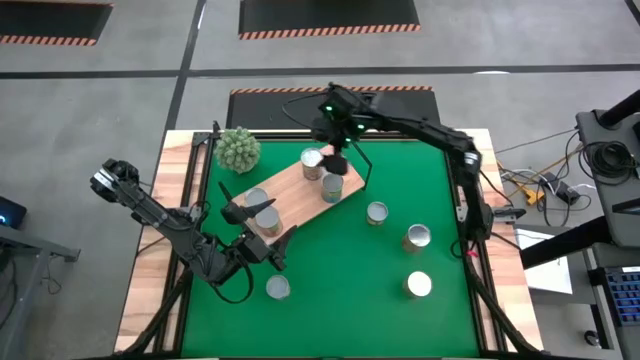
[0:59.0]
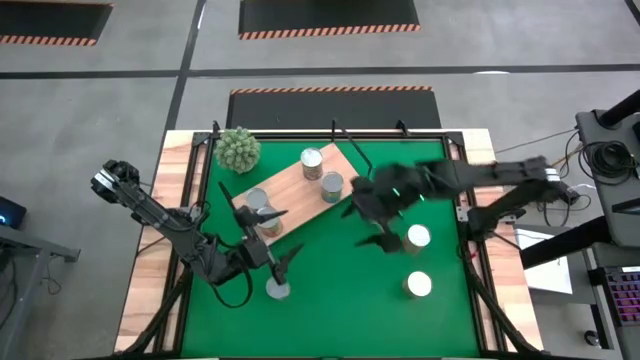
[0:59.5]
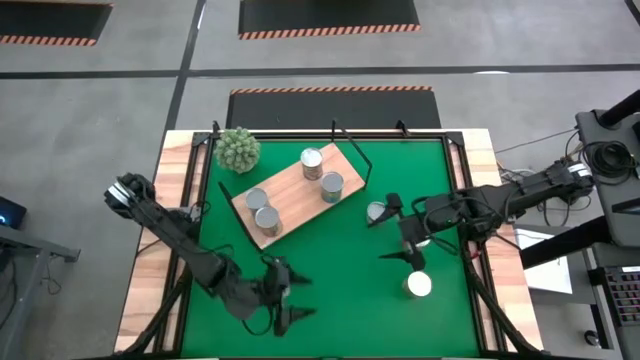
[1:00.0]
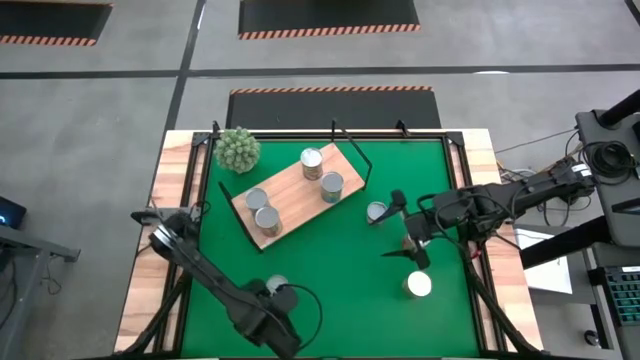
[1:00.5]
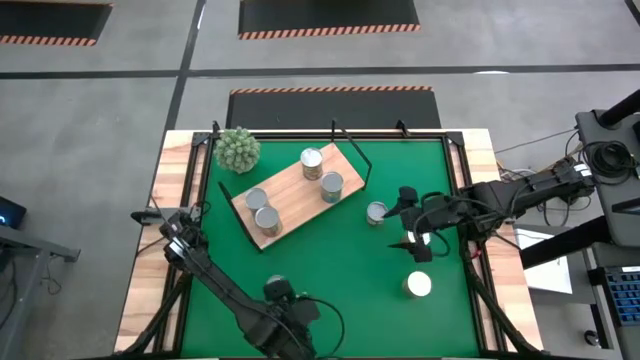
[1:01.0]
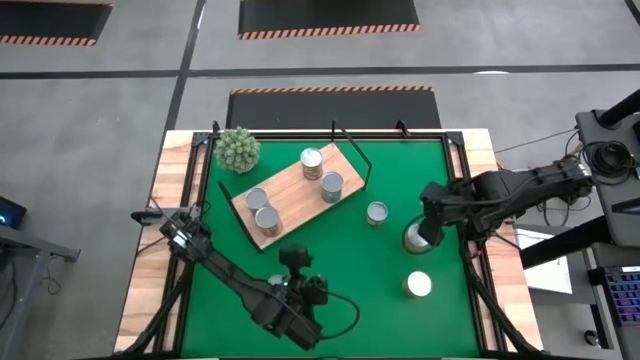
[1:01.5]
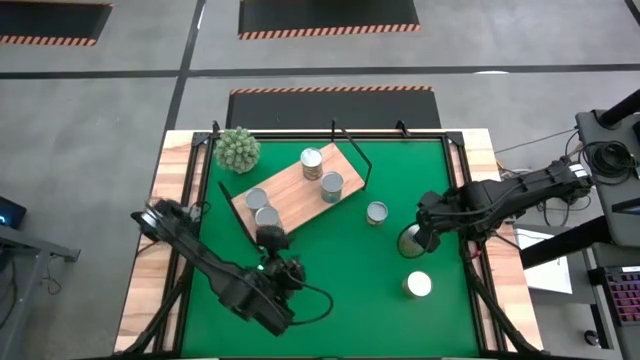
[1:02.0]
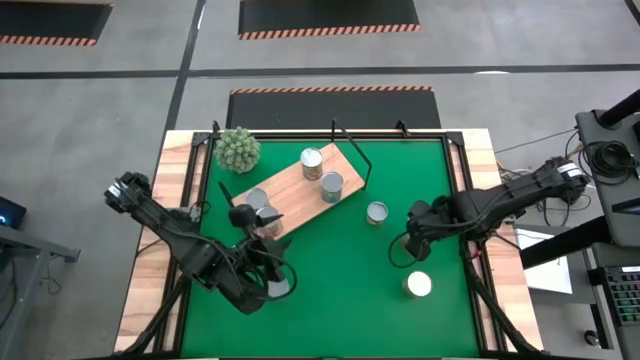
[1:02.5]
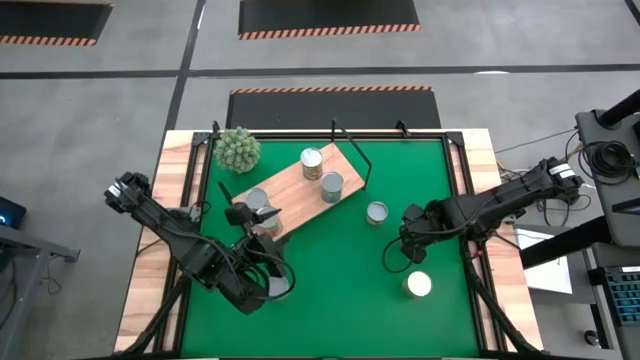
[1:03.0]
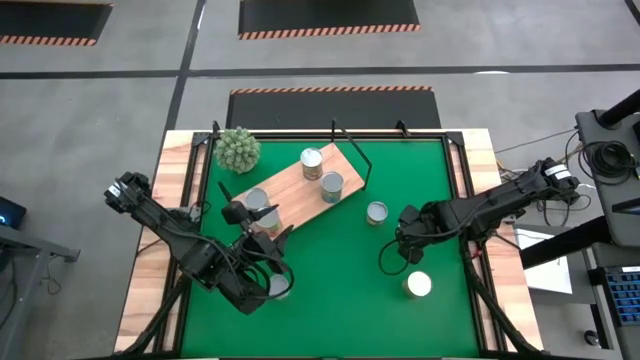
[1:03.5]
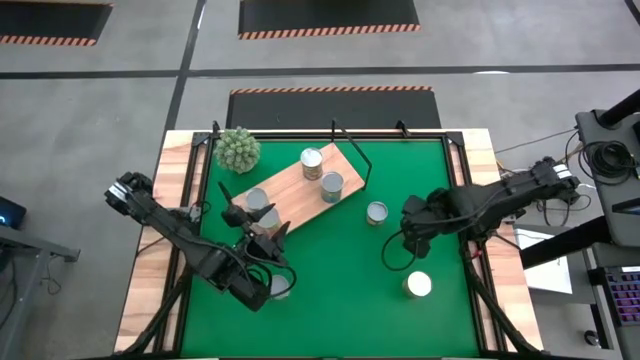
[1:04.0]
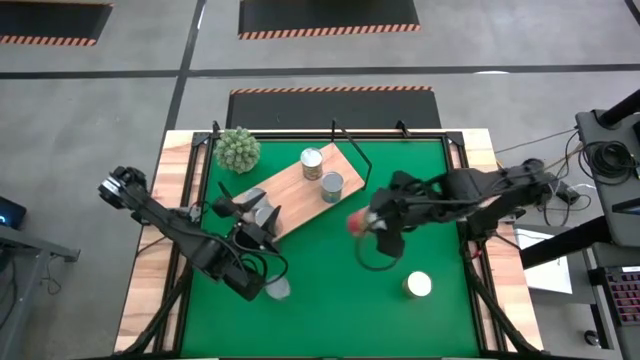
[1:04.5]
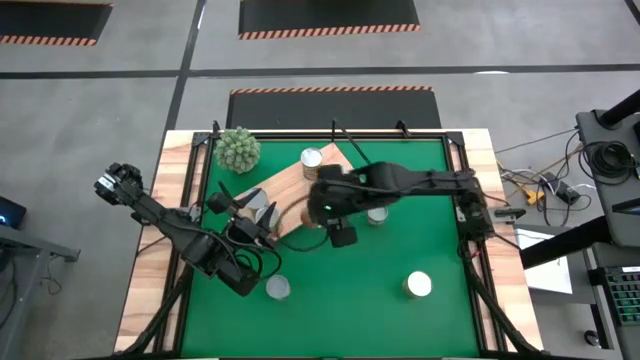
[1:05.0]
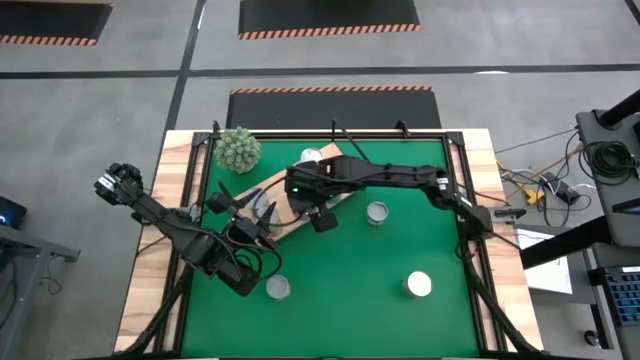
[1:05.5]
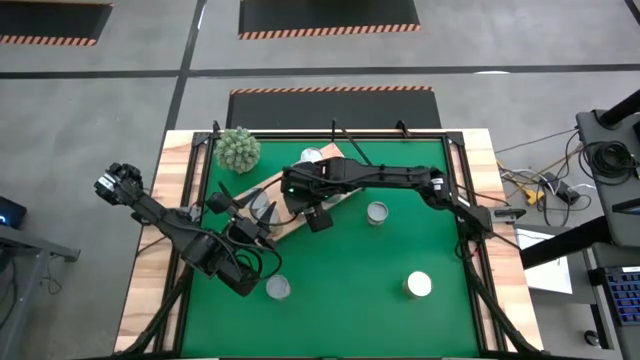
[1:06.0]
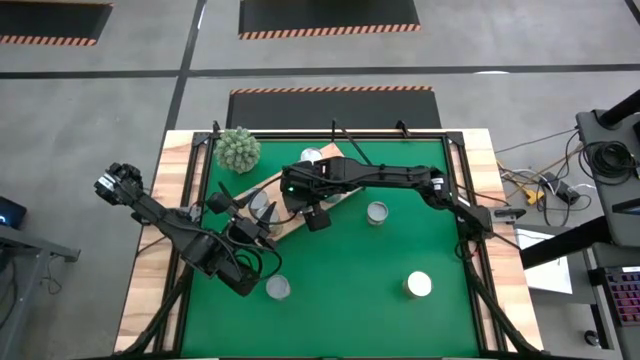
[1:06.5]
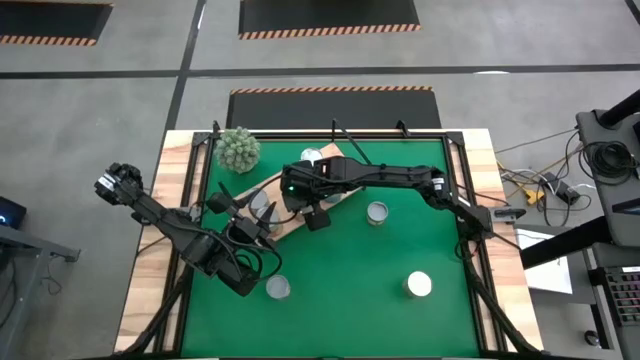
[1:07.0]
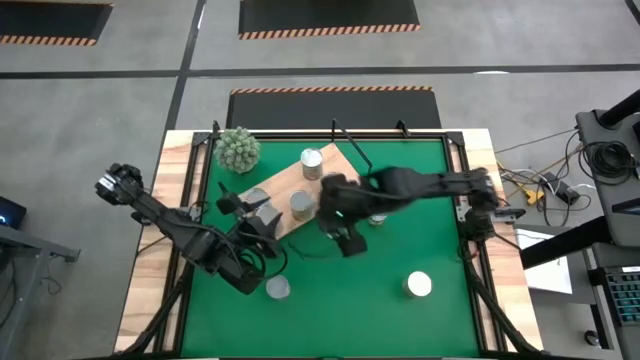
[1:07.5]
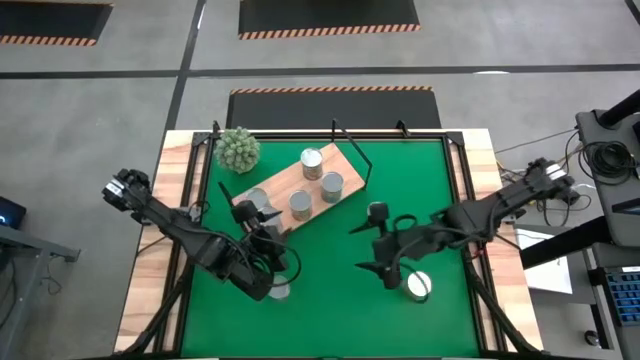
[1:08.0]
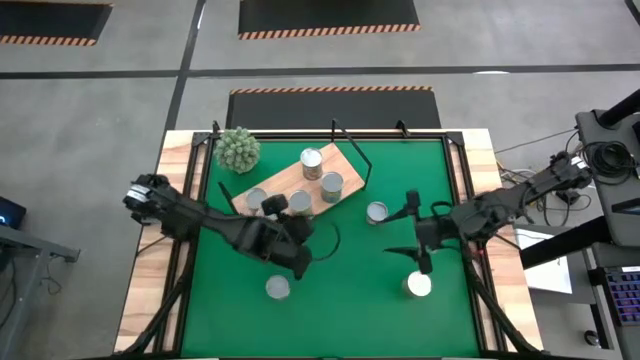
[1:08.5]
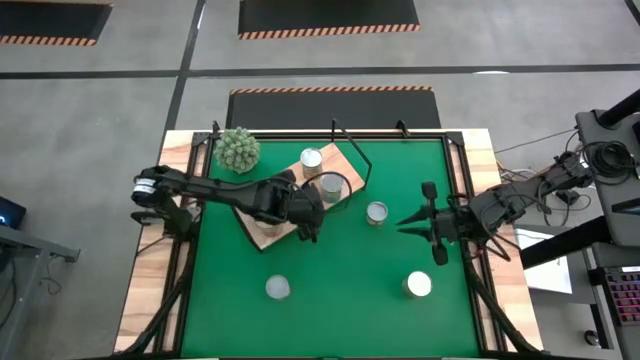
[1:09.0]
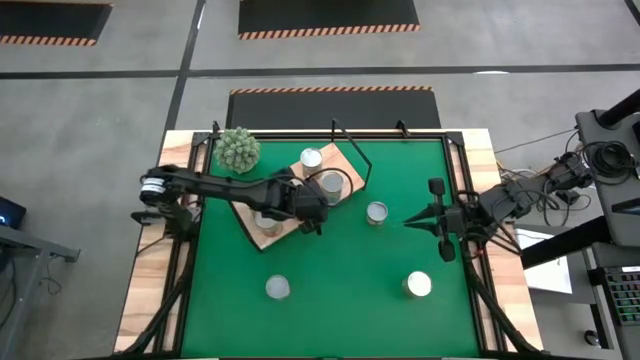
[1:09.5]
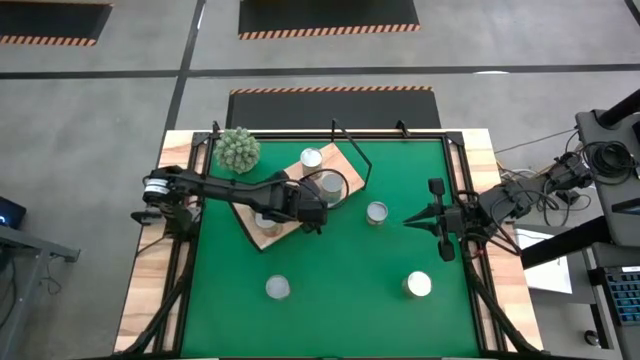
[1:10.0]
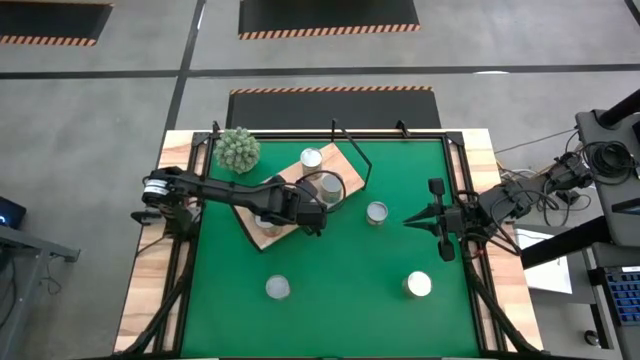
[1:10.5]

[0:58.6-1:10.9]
Task: Pick and place cans onto a shelf
Put the canned pineapple on the shelf

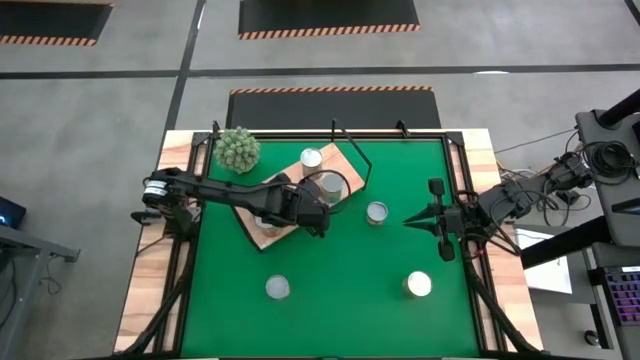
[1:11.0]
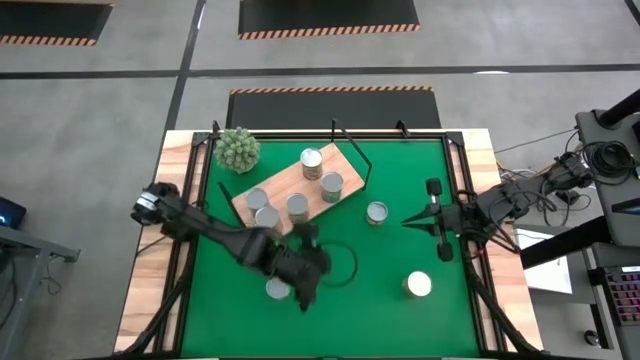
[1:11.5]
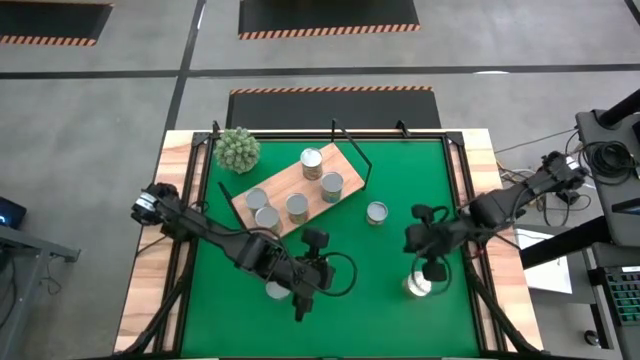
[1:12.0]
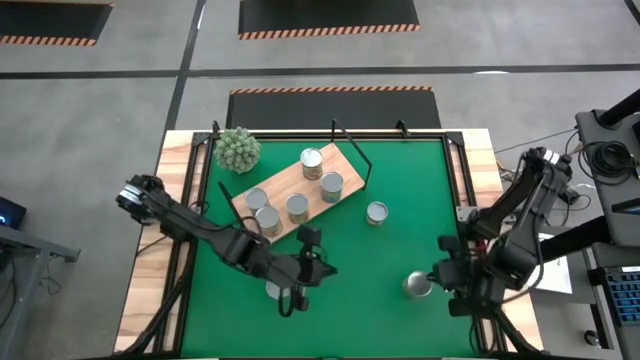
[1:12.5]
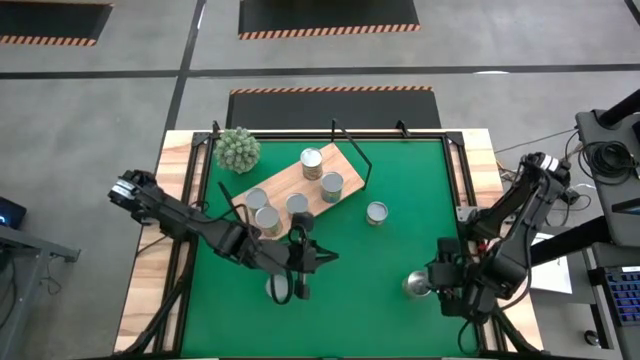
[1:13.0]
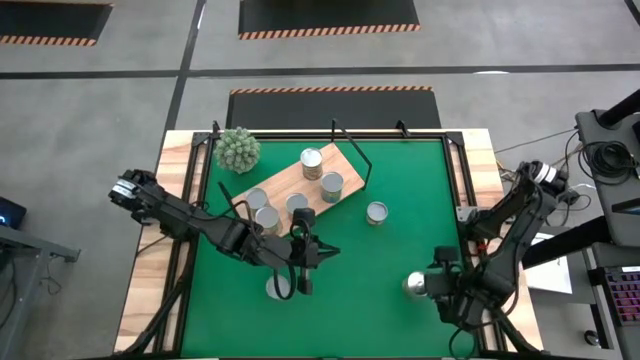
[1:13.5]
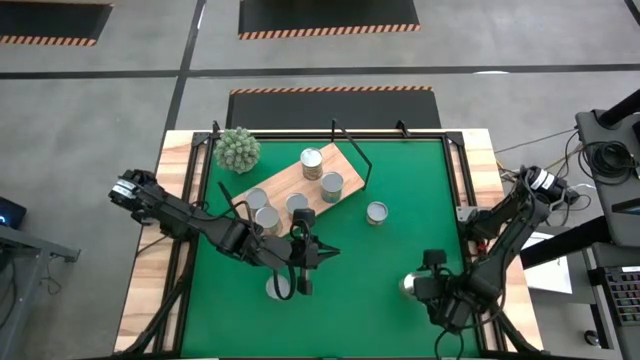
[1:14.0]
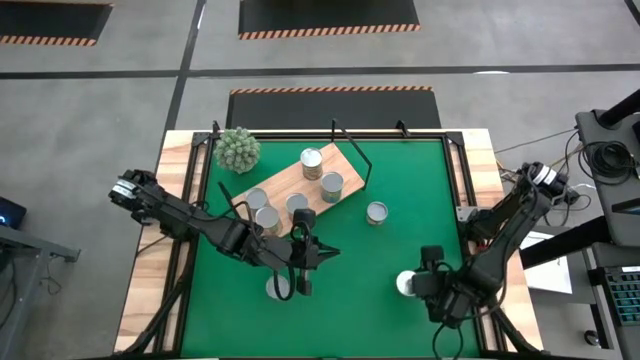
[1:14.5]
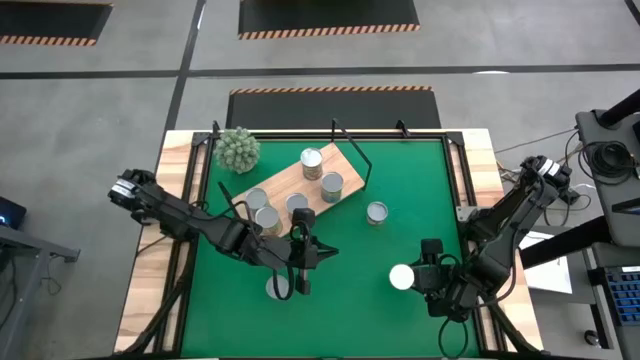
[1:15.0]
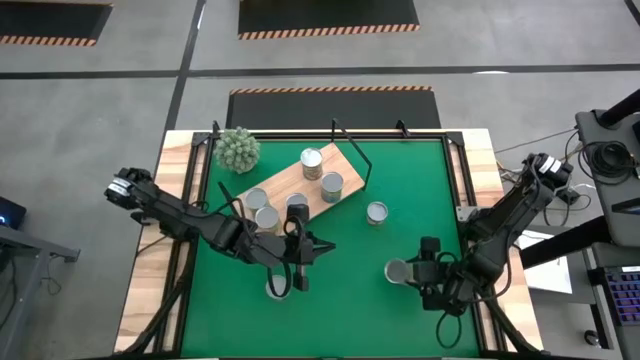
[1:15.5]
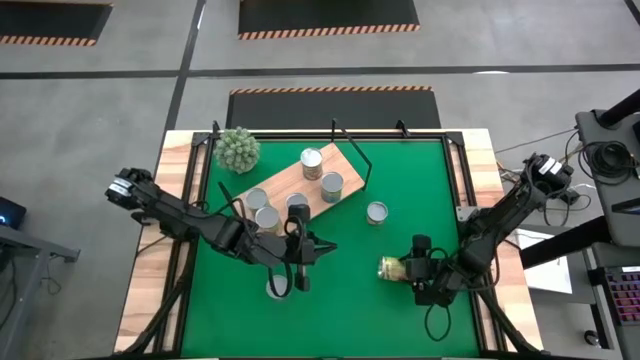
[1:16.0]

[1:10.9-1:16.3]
Put the canned peaches on the shelf

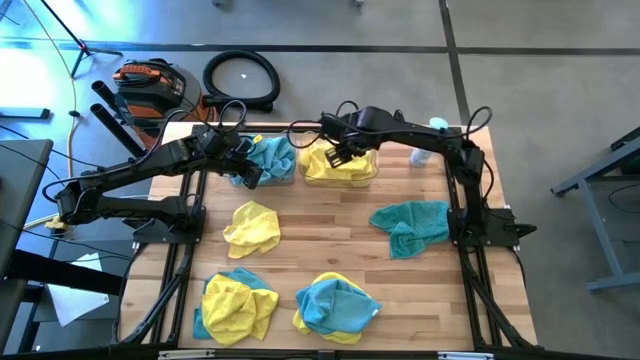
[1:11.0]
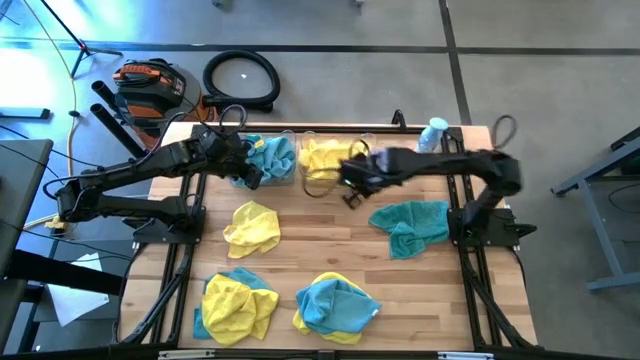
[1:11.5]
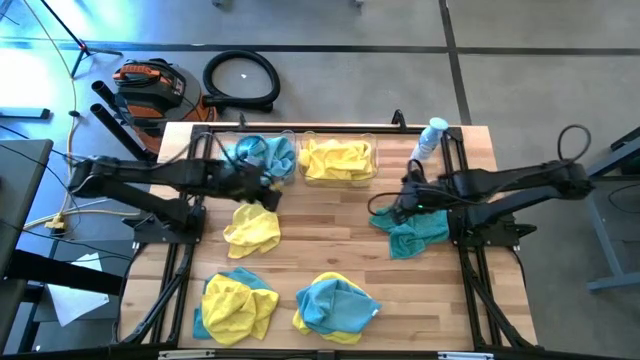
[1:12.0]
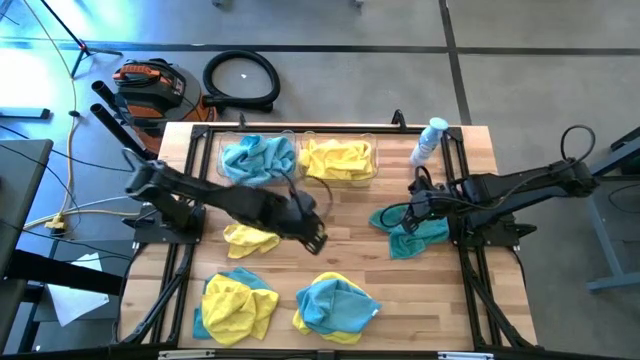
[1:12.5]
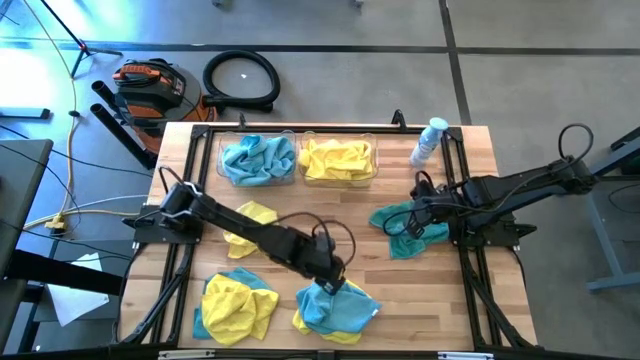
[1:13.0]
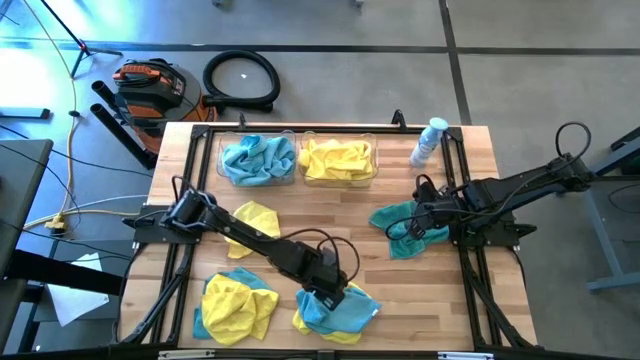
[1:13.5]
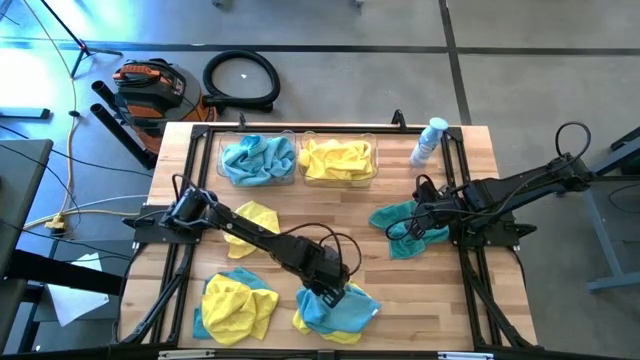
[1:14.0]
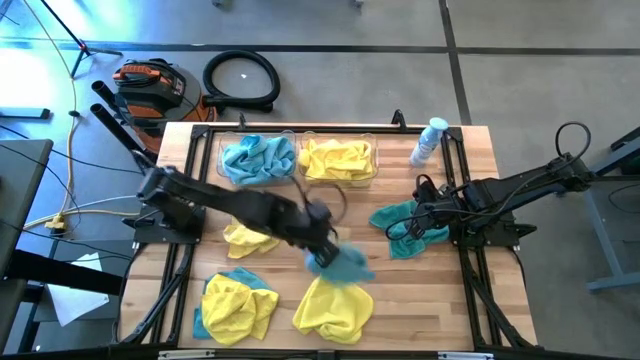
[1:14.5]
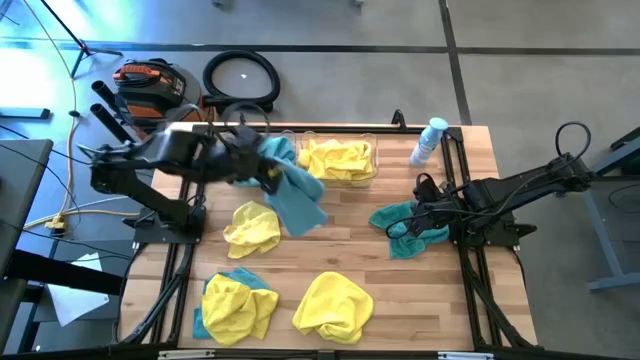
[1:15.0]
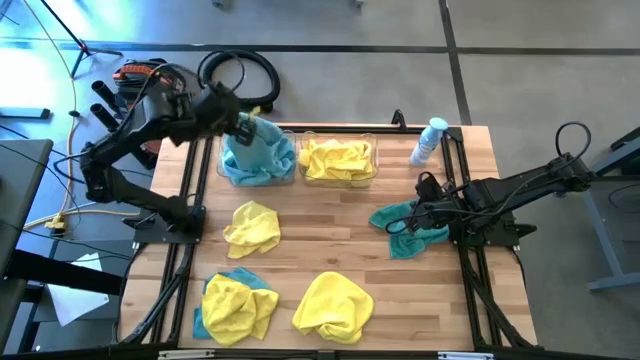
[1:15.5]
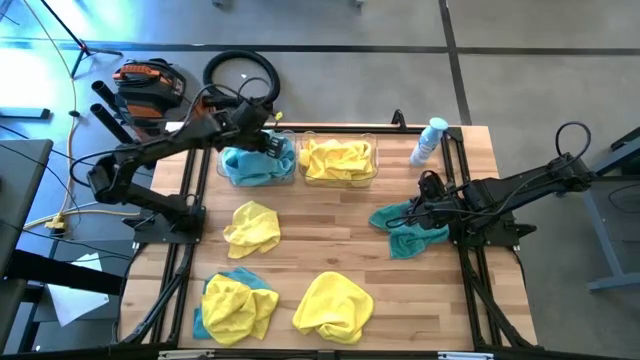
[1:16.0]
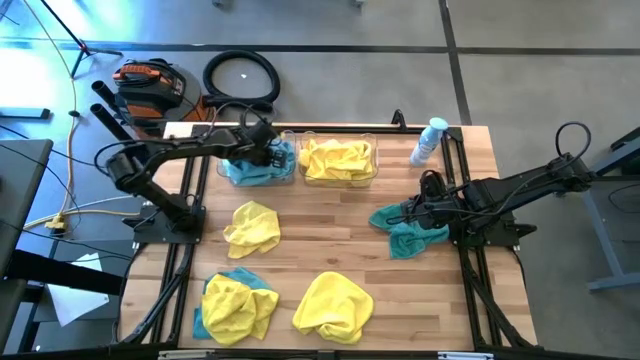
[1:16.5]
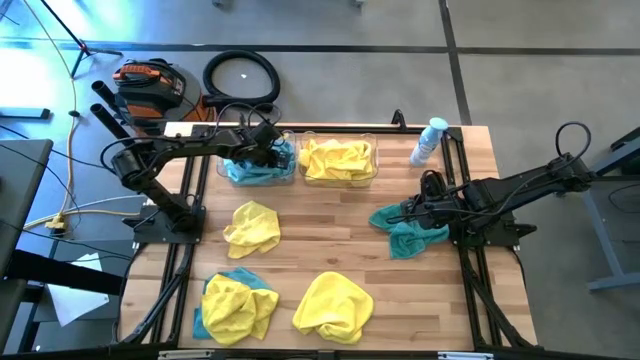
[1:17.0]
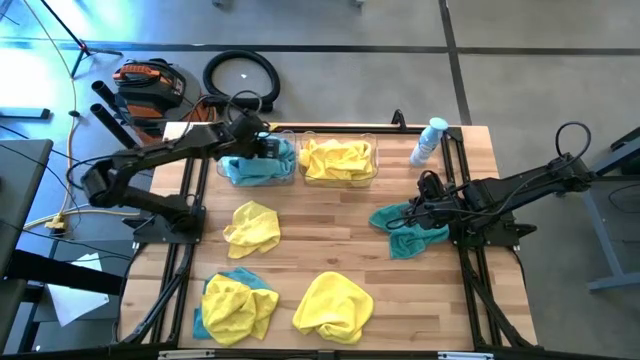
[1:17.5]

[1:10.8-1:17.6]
Task: Sort microfiber towel by color & place in baskets
Put the blue towel into the left transparent bin
